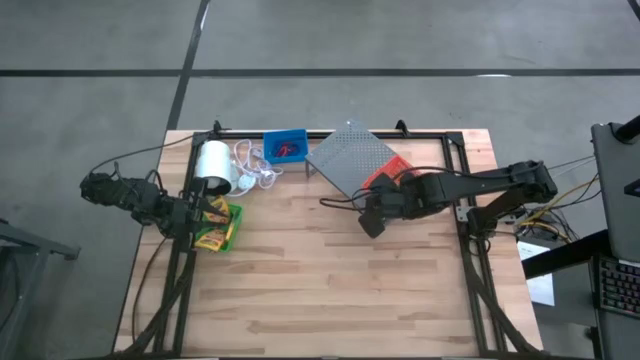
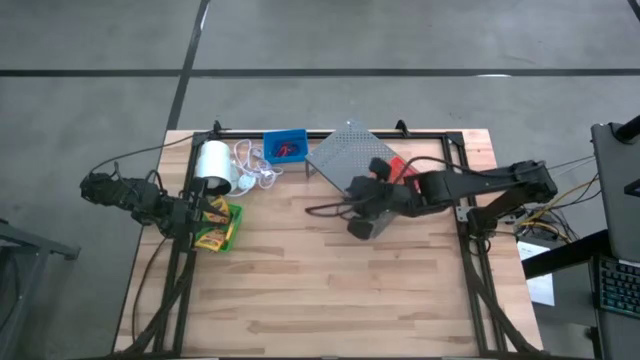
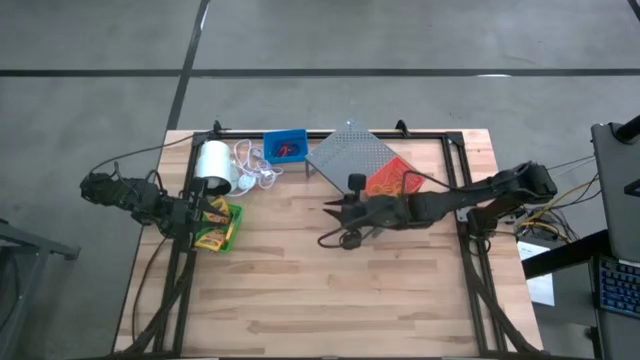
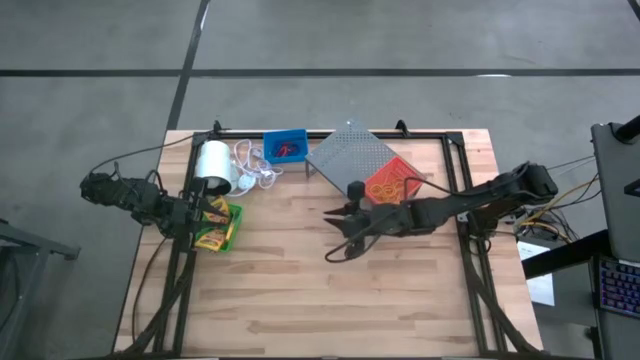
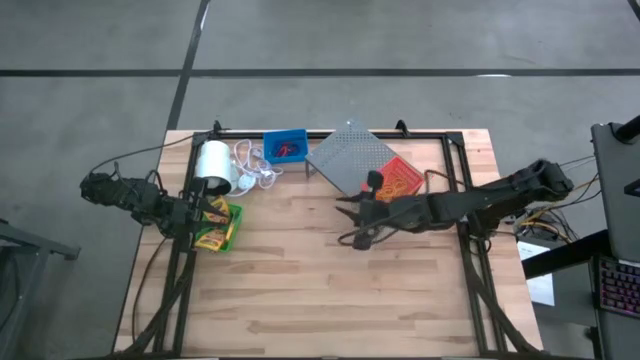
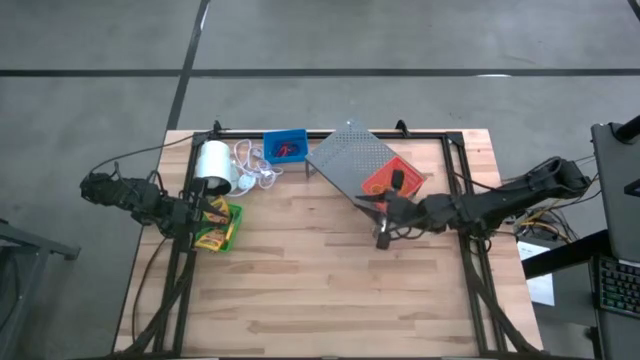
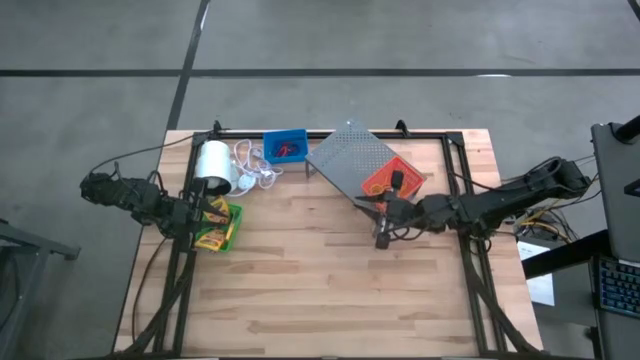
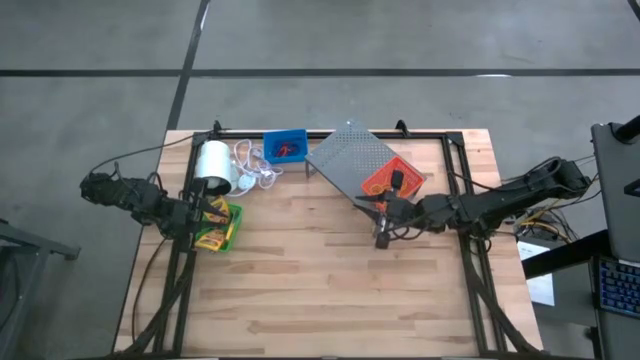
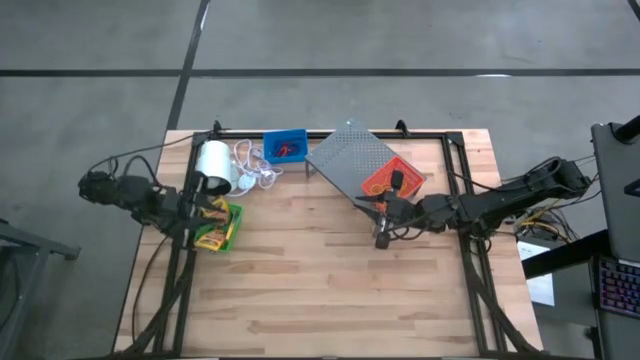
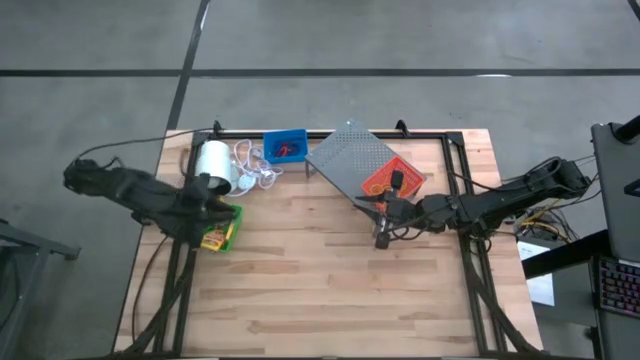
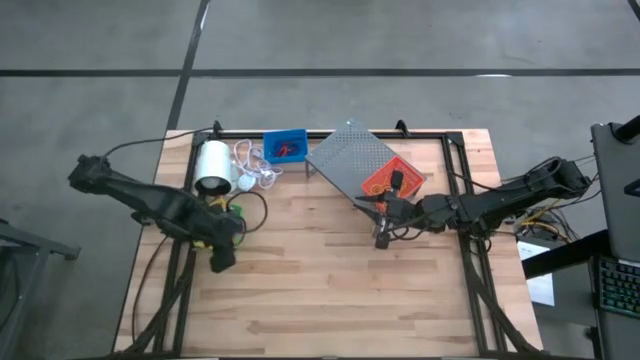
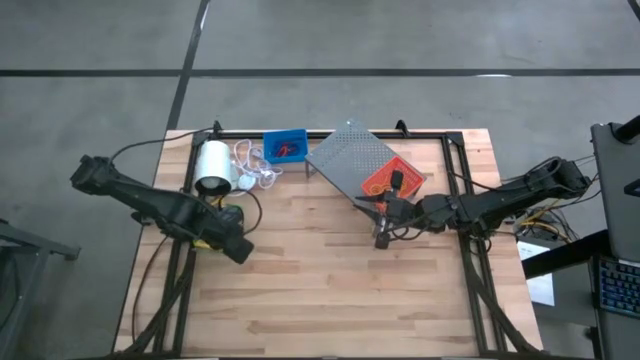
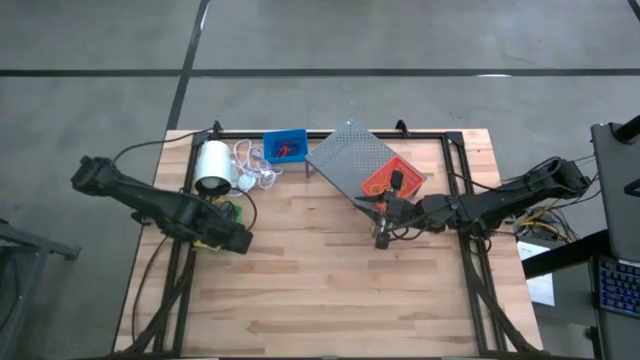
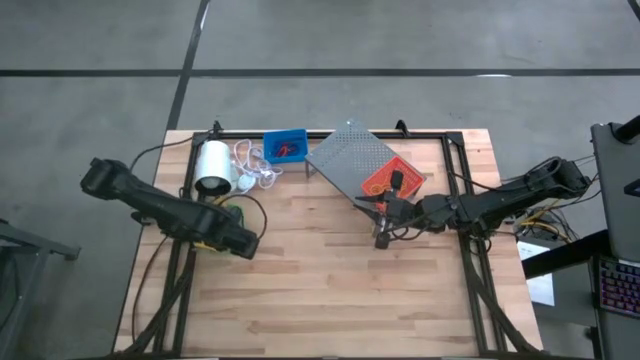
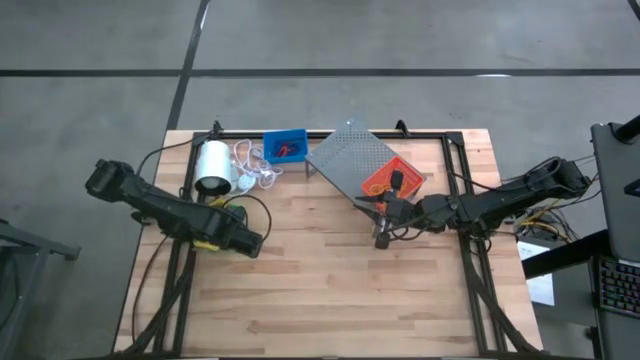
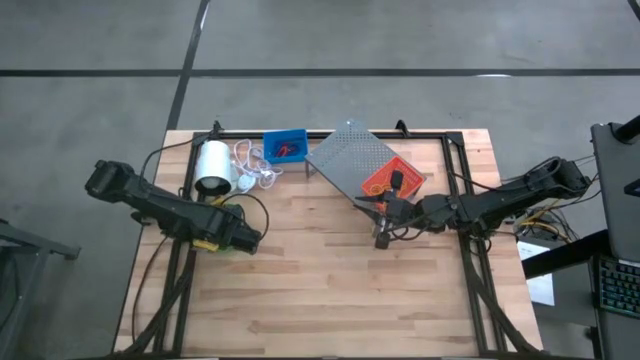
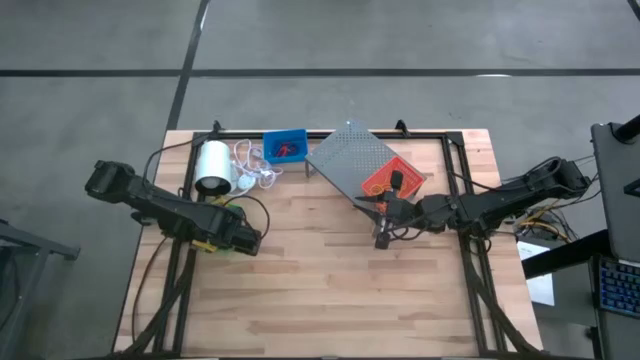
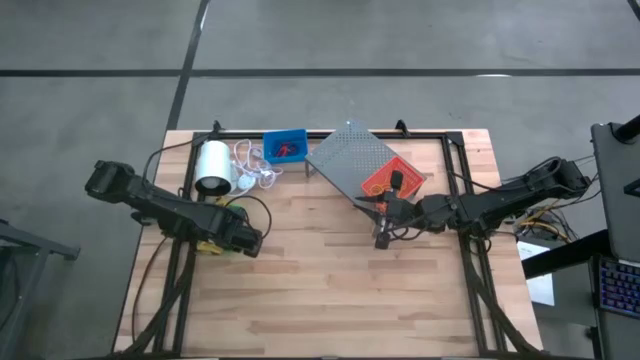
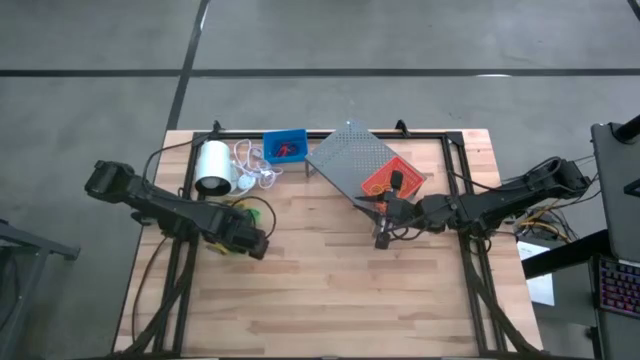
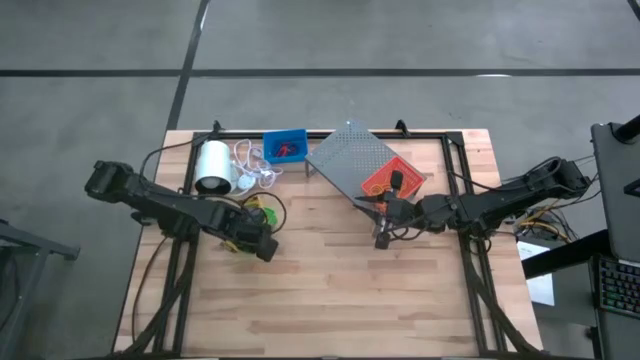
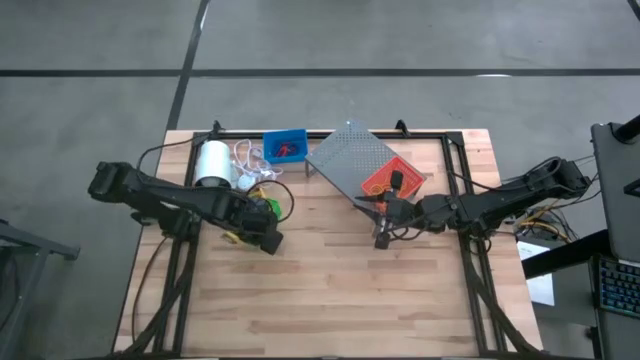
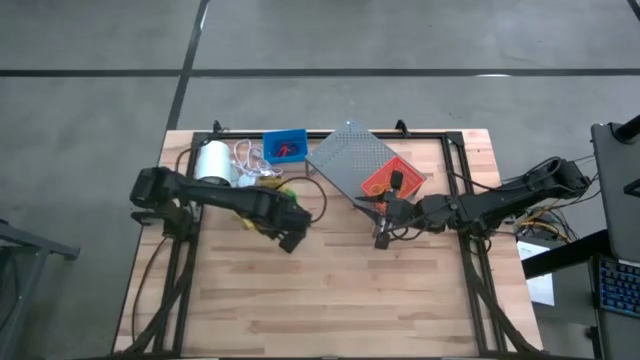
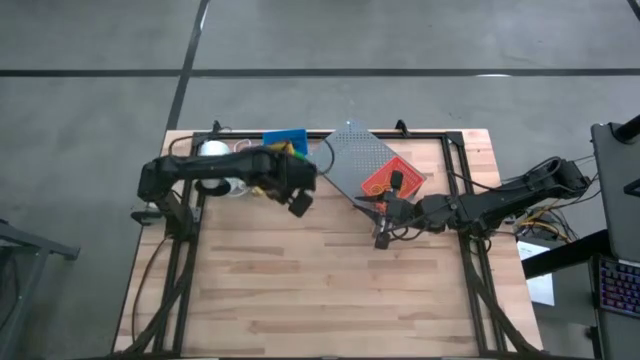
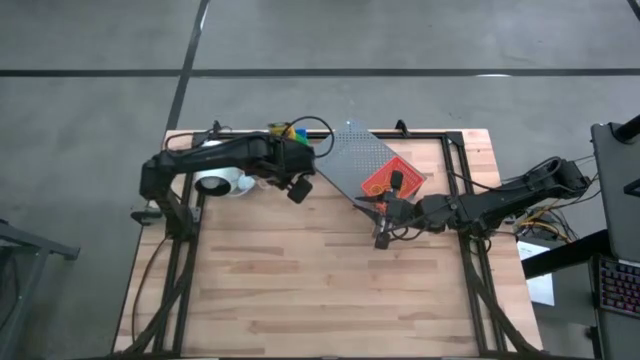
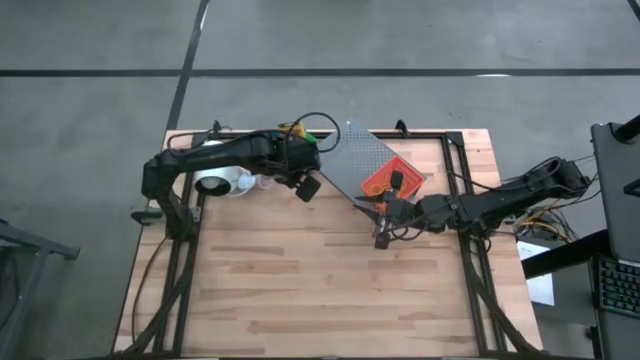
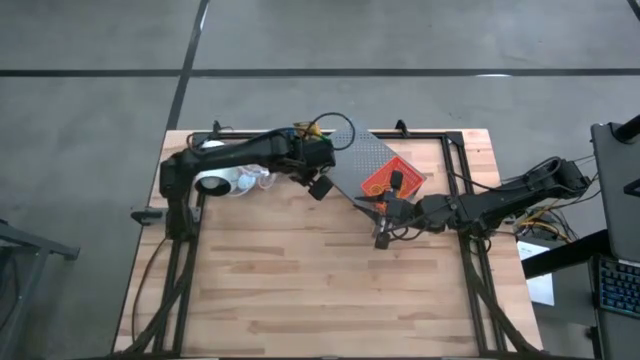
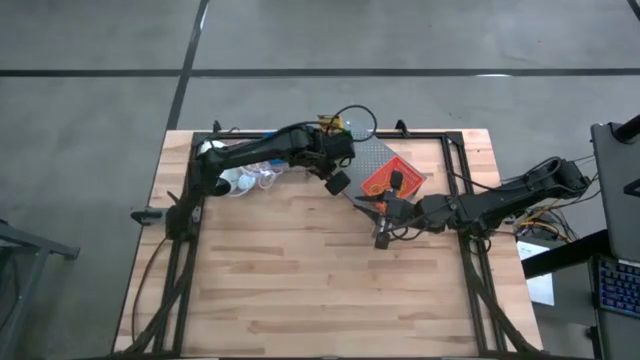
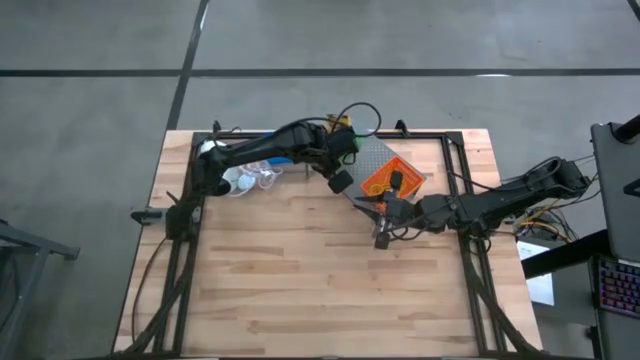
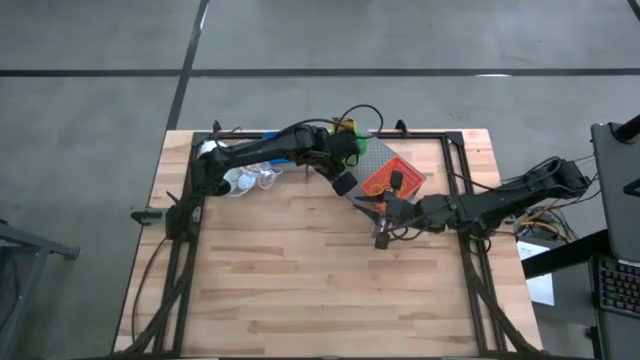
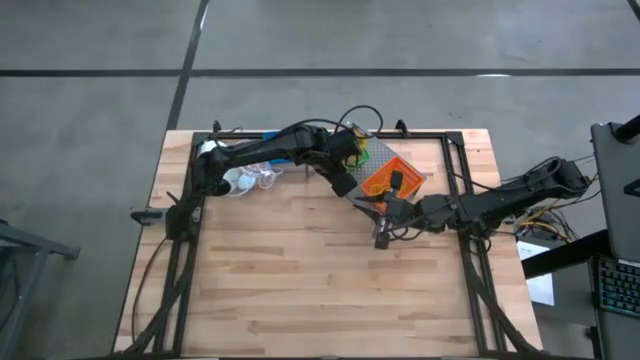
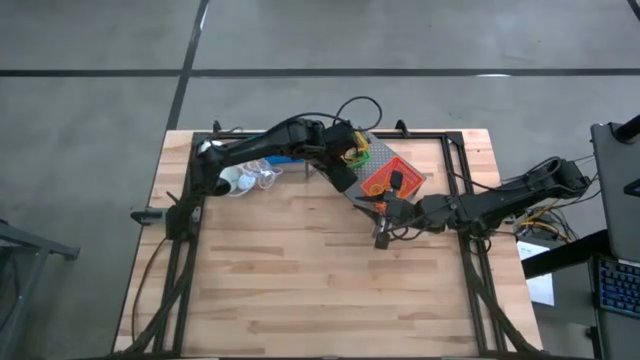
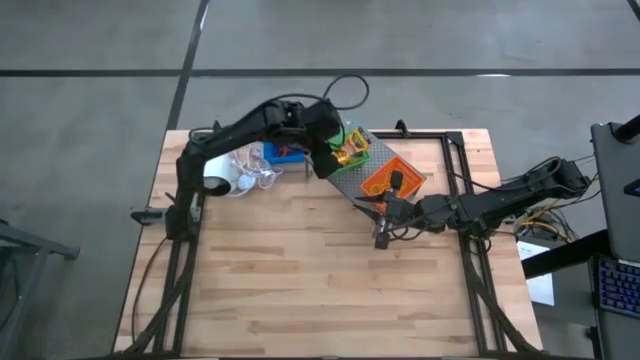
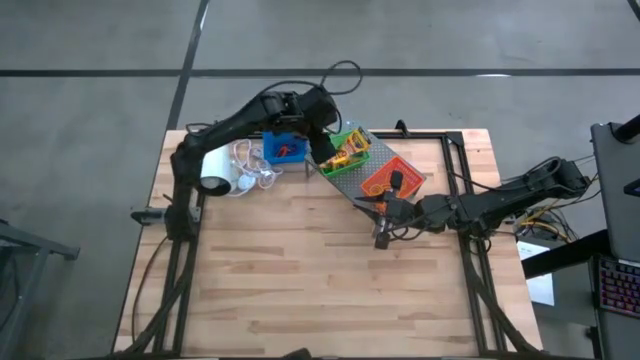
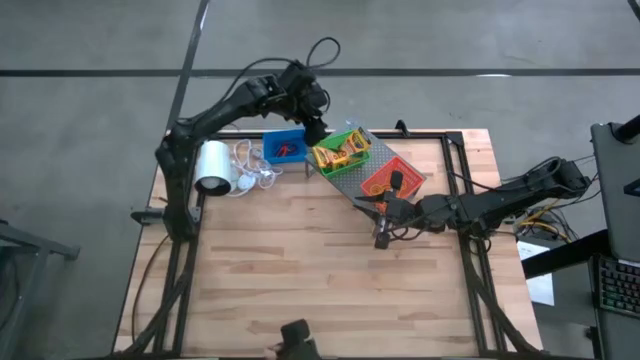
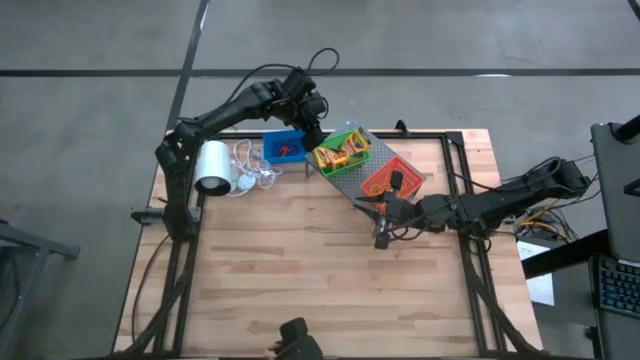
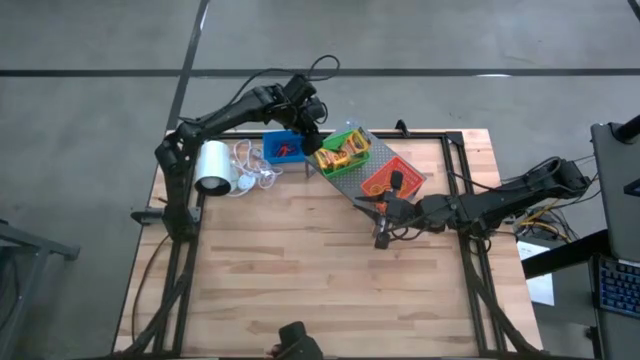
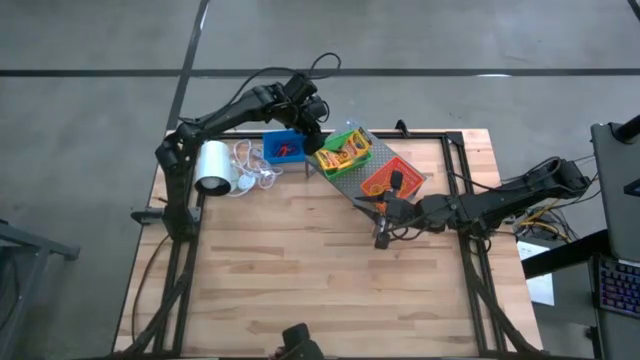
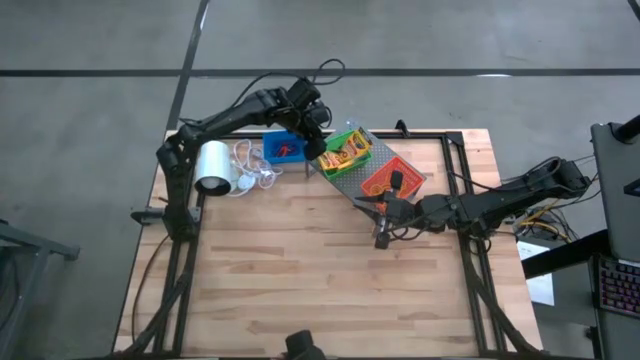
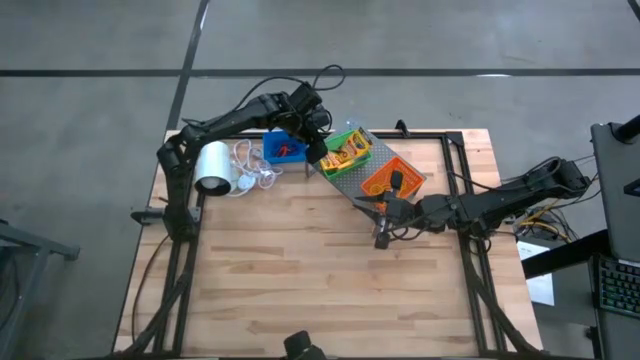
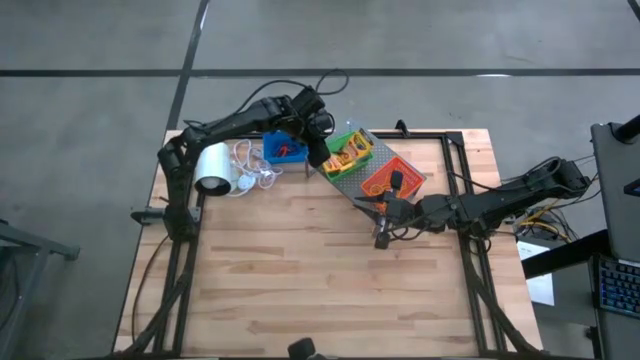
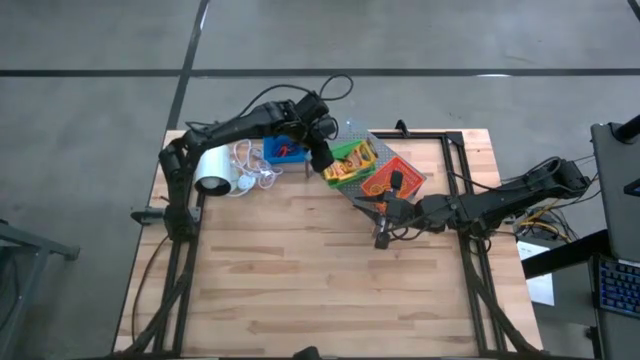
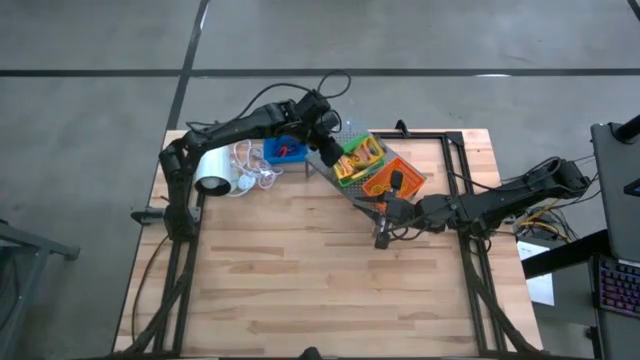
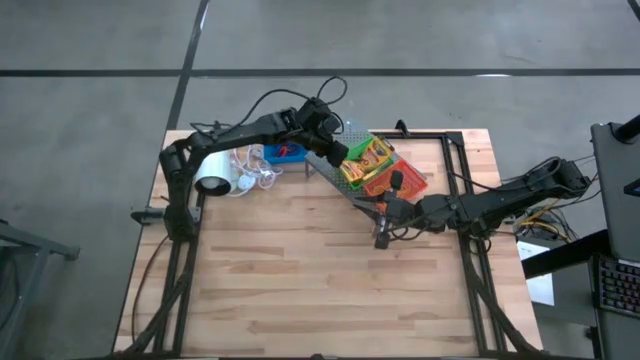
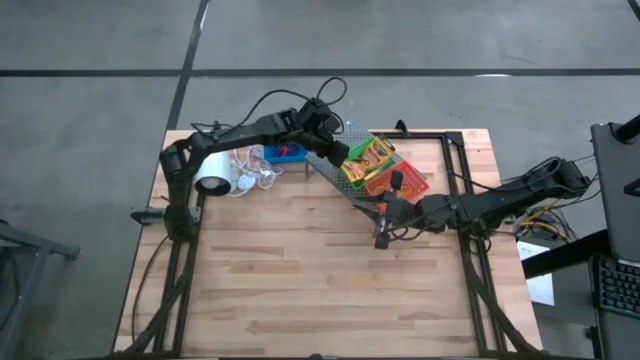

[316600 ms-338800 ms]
Task: Pick & Place Office Desk Supplies
Put the green bin on the shelf
